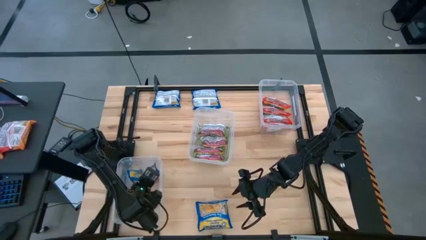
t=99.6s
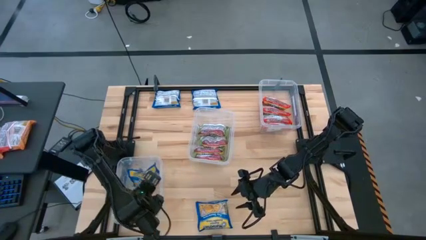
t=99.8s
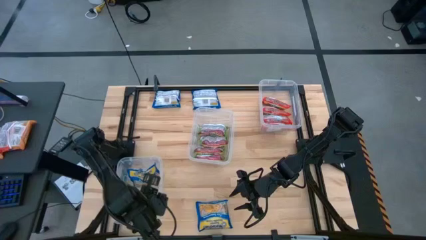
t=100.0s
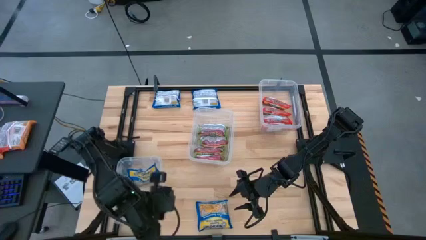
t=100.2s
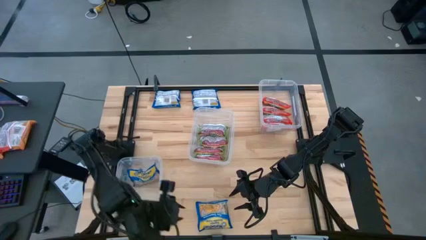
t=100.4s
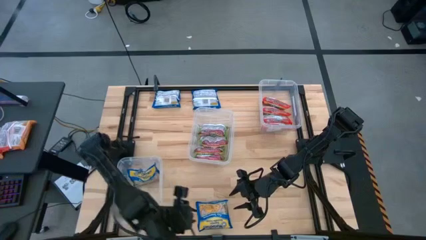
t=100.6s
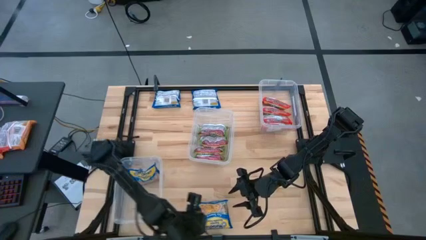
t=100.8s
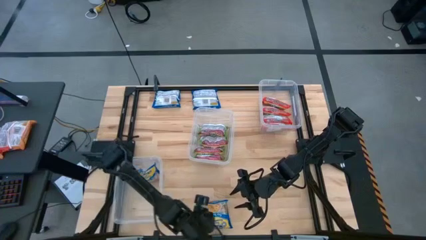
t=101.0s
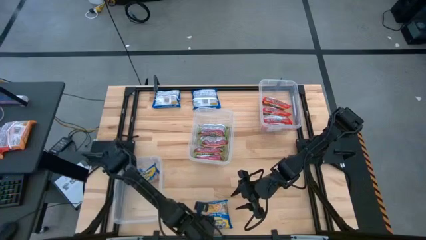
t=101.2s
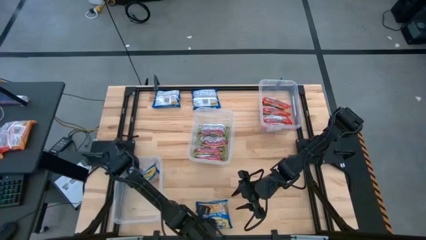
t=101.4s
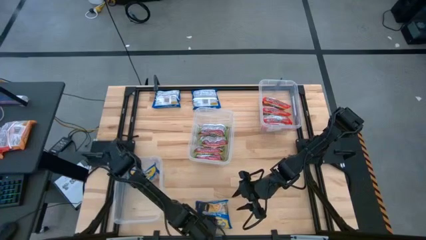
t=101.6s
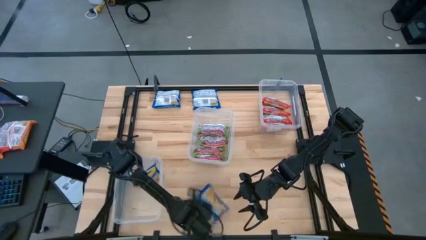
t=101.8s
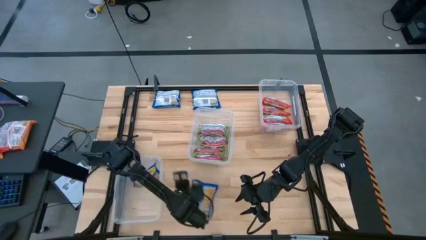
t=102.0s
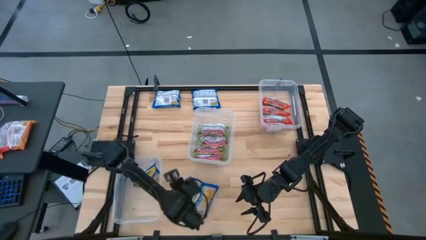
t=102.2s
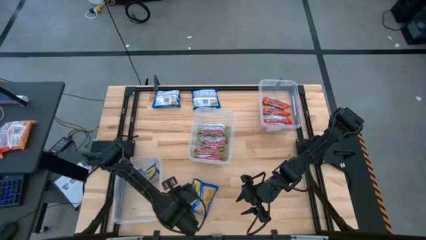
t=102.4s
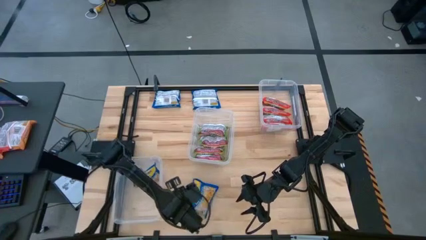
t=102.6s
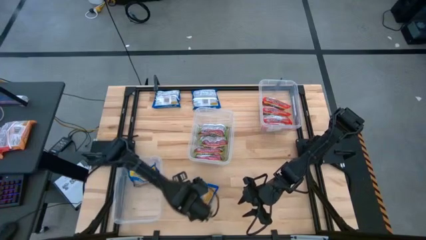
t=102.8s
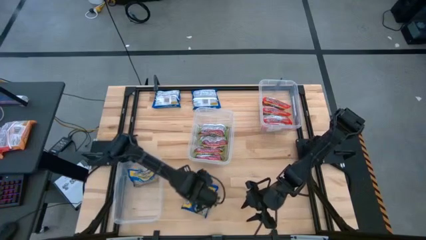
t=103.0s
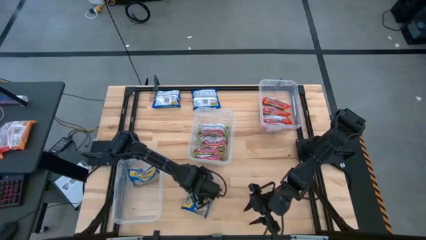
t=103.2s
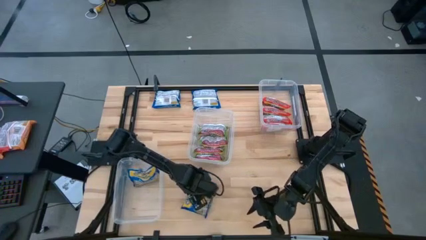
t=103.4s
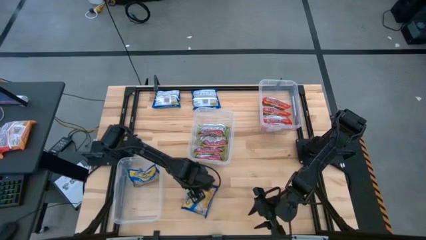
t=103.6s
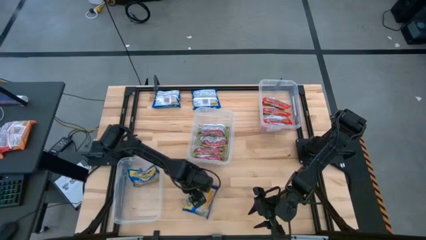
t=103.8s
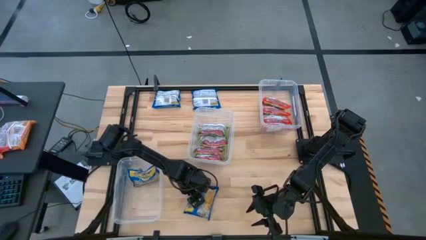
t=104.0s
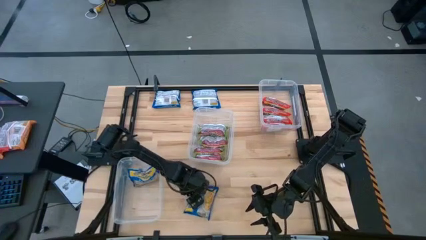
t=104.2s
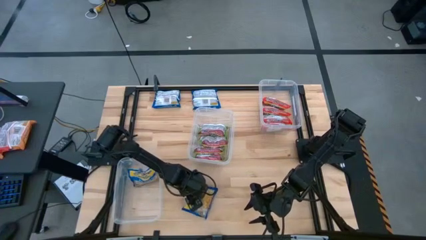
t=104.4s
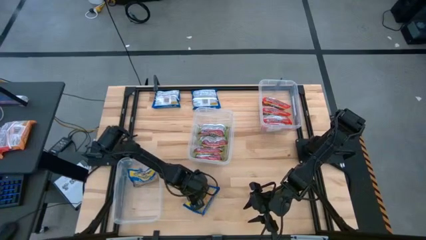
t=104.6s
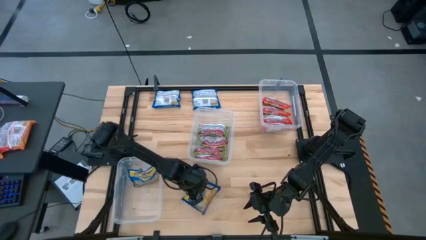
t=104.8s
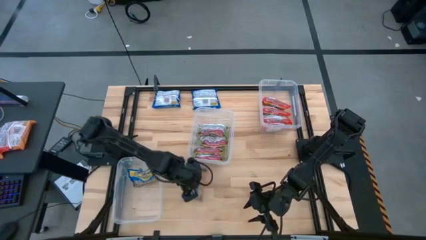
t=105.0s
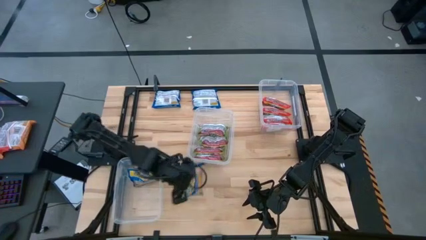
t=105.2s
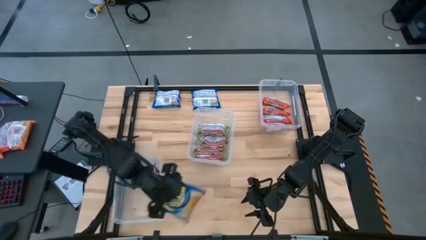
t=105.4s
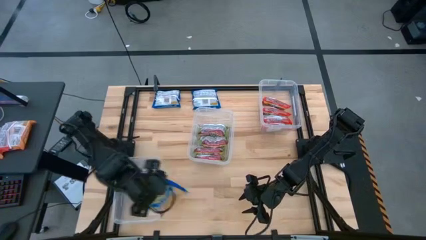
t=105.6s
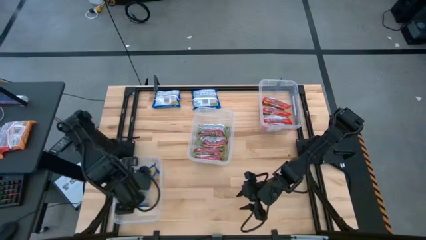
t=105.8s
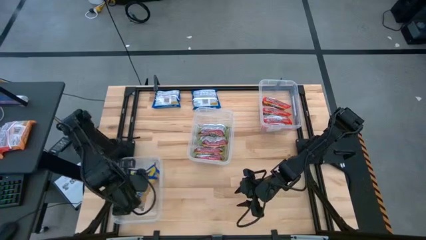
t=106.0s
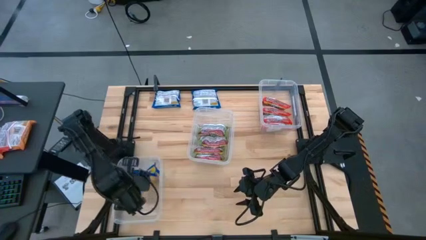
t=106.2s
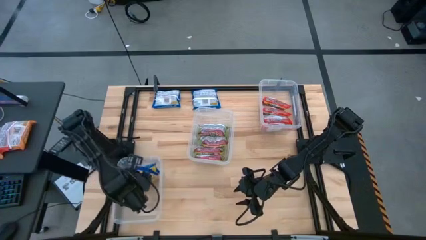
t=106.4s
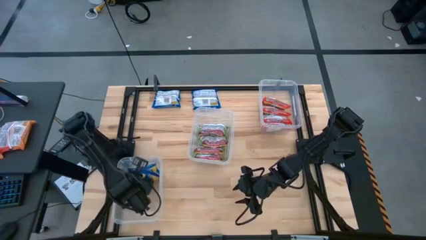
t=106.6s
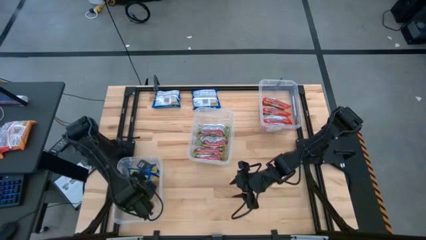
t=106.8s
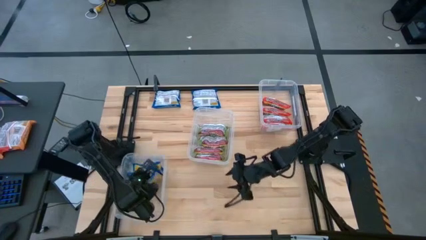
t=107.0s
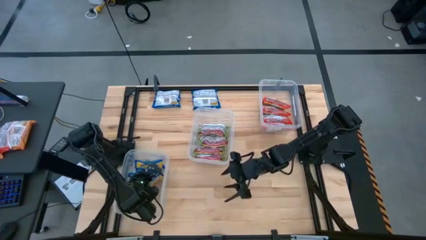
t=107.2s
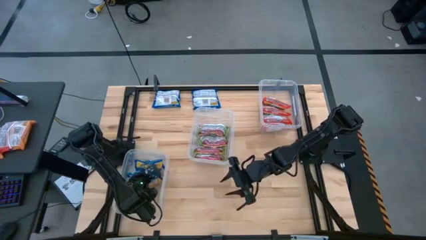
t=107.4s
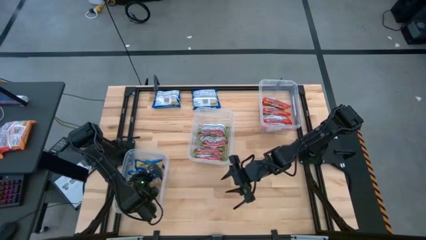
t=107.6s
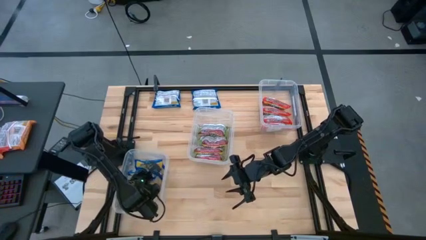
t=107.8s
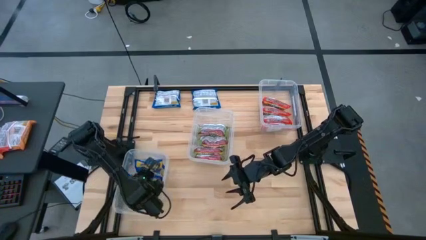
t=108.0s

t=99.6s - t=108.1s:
Task: Sort Maruchan noodles
Put the blue noodle pack into the bottom transparent container

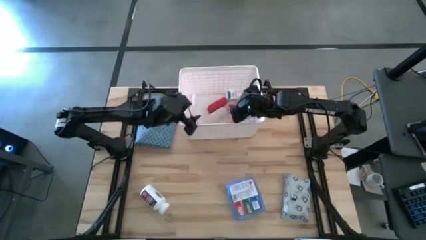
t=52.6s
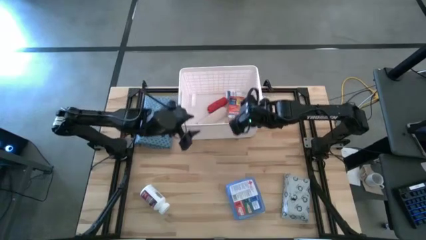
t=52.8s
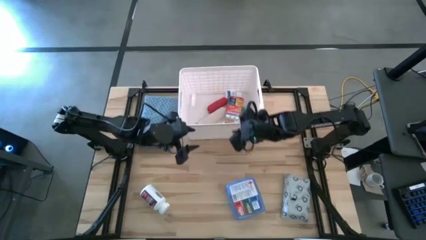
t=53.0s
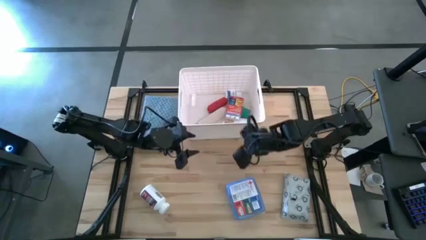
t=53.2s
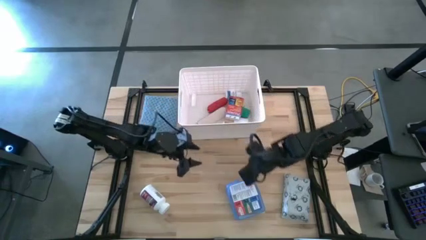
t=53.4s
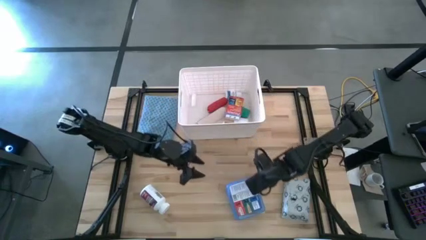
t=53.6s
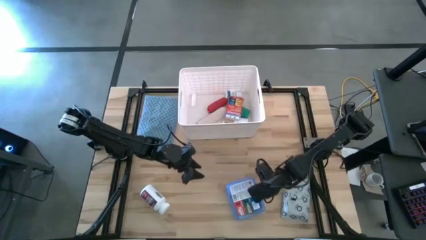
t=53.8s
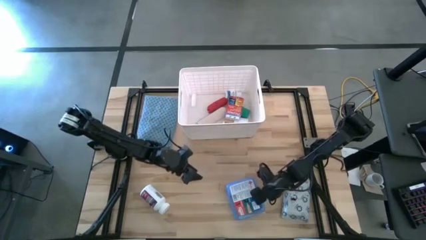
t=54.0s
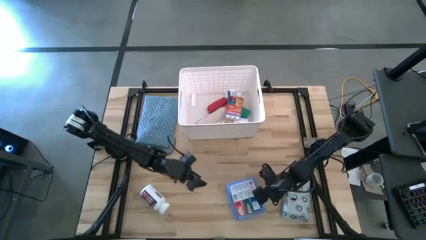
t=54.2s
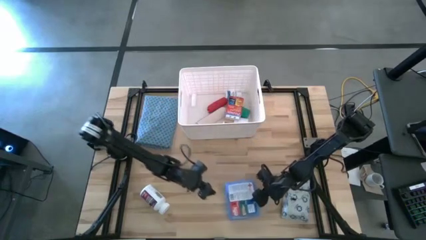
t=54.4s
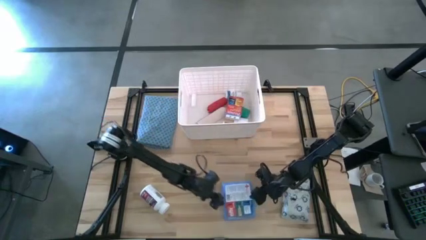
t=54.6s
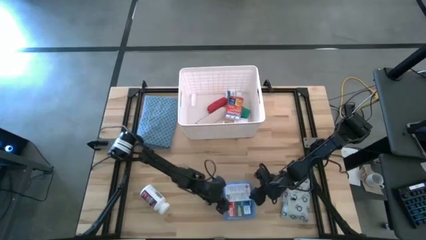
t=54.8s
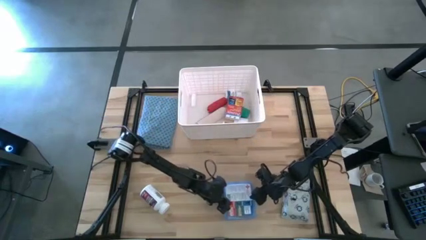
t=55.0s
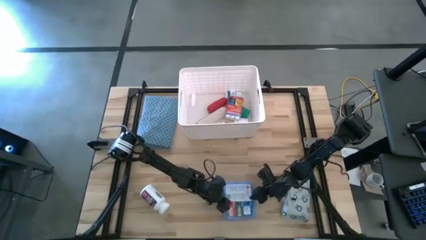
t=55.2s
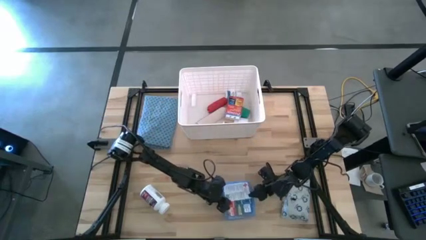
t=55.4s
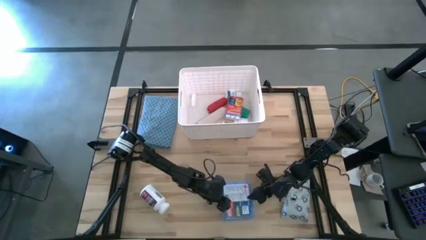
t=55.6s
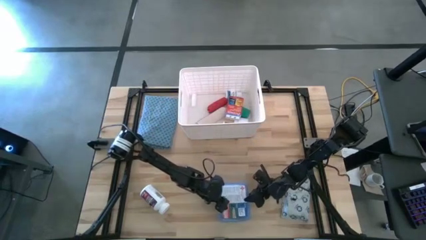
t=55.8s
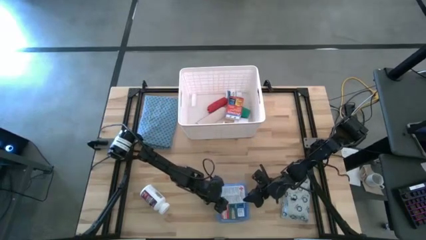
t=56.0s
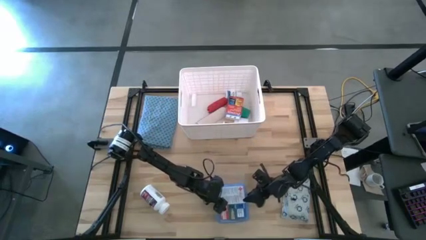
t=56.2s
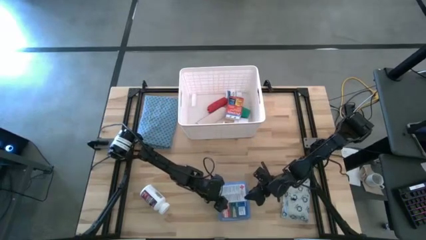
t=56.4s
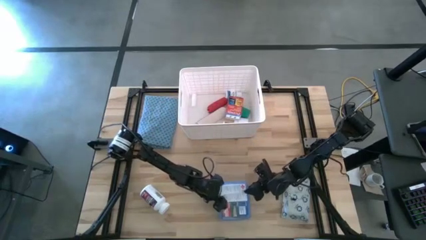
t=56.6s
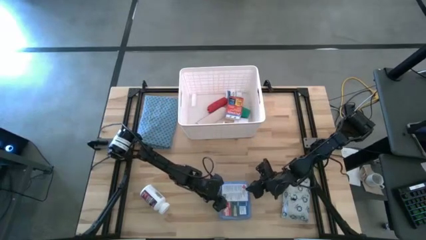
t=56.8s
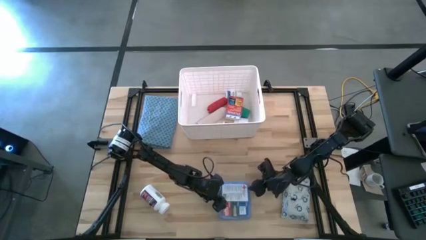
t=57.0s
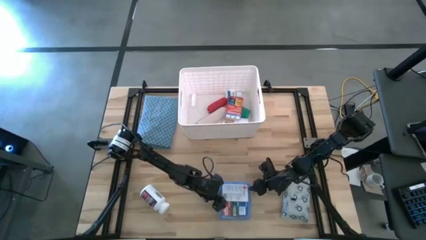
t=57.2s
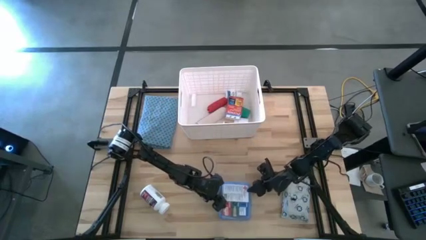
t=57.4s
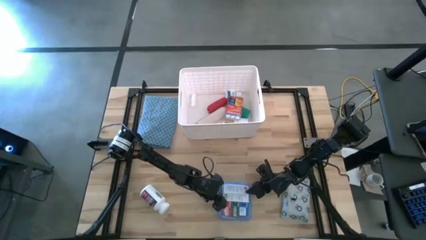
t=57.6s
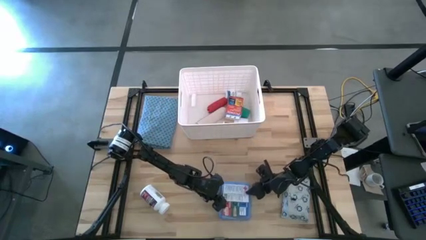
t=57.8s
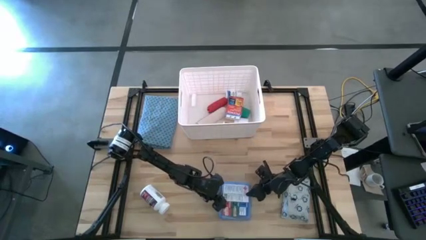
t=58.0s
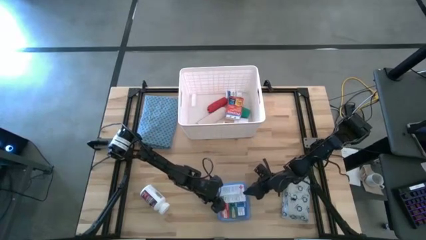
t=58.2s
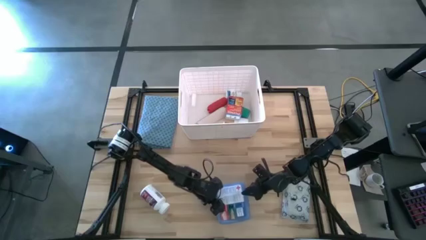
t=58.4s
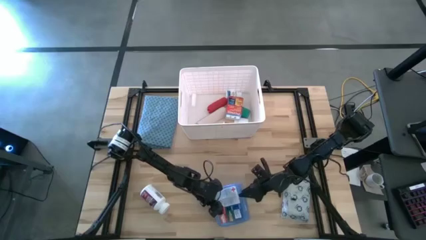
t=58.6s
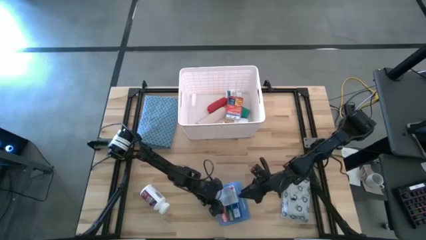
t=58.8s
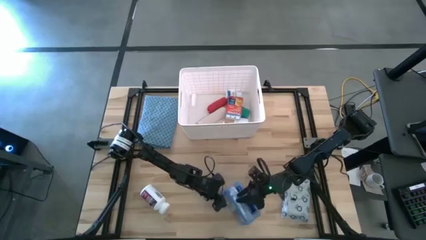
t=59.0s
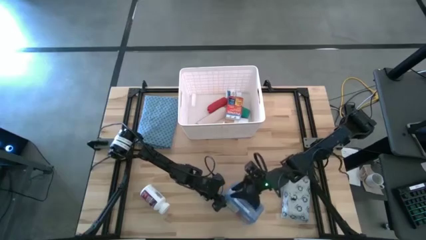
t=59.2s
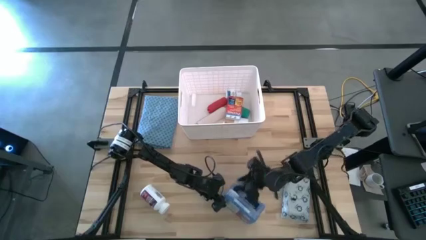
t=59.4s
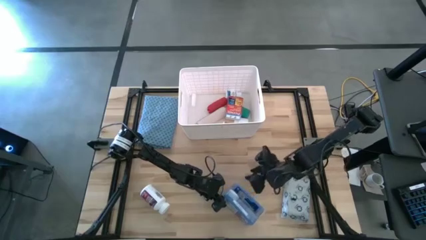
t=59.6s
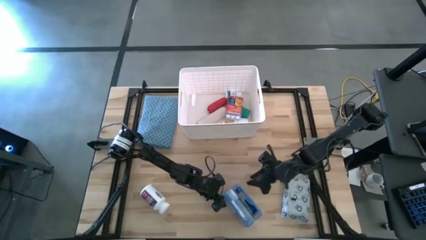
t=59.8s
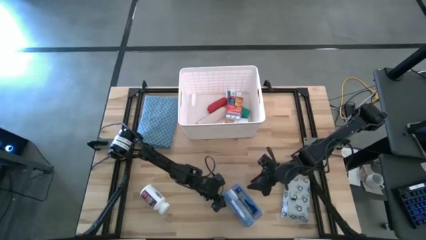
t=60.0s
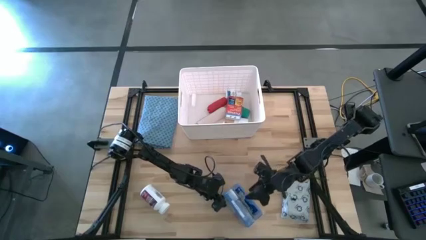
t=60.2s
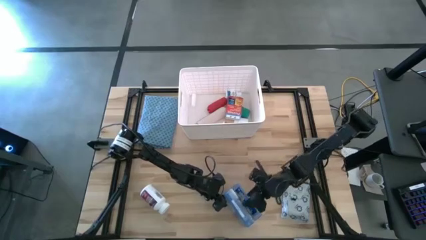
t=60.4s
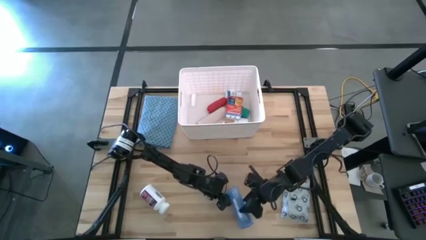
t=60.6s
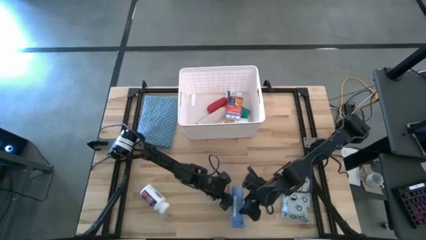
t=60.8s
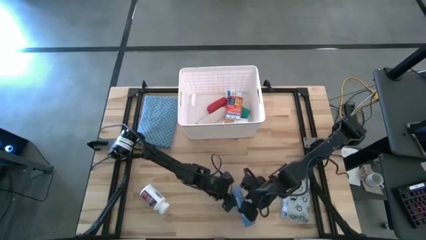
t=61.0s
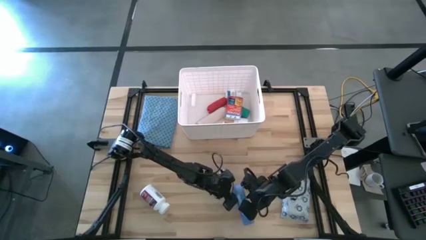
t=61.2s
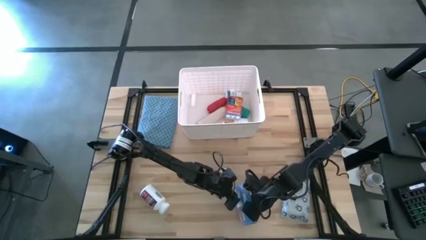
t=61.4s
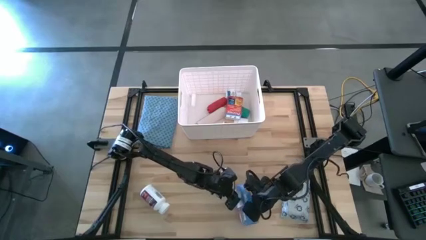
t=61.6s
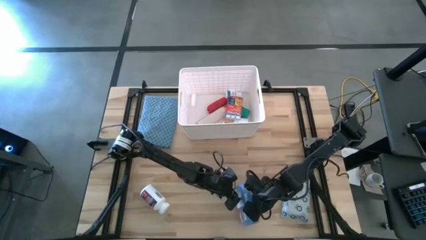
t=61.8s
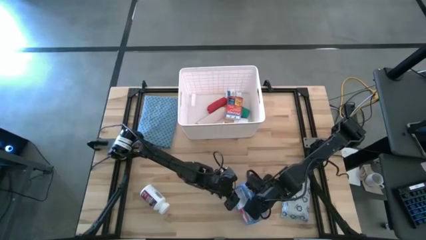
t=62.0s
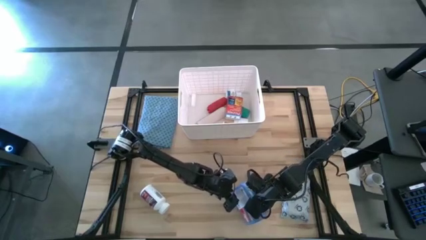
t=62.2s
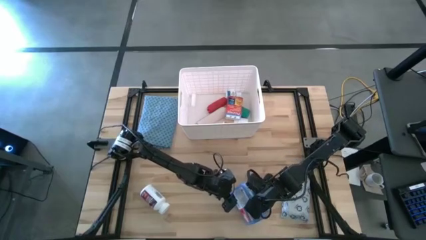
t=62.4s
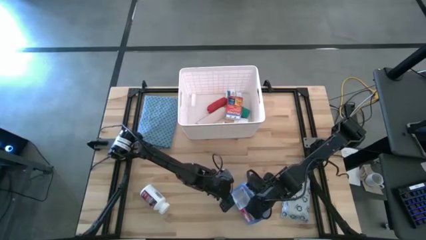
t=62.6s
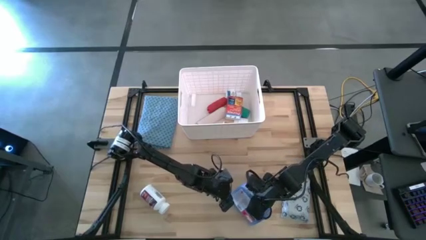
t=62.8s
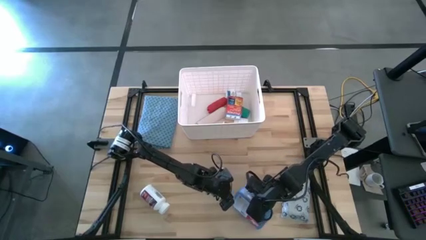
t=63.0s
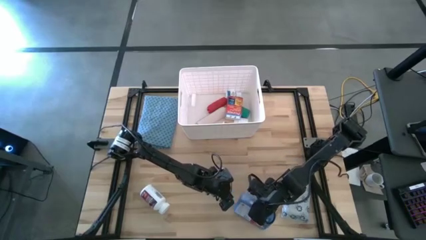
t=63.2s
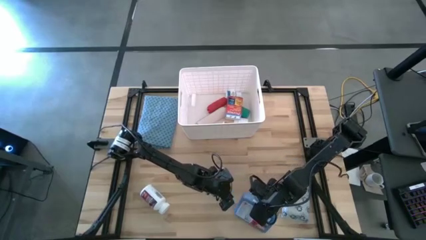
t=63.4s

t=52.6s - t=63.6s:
Task: Pick & place medical supplies in basket/bin
Put the blue first aid kit into the white bin
